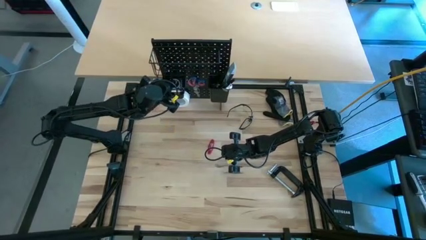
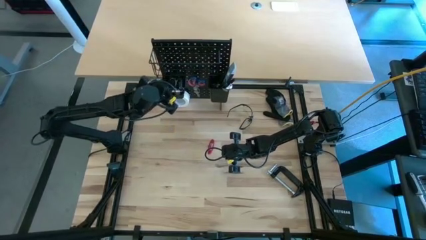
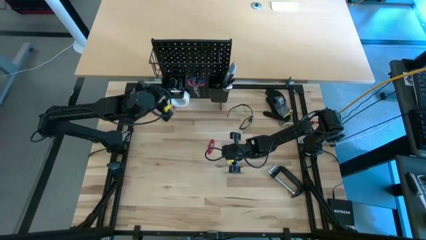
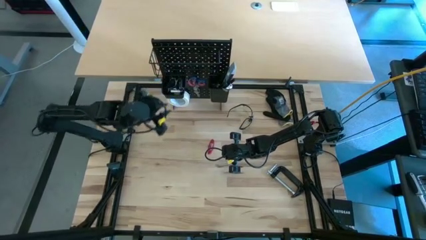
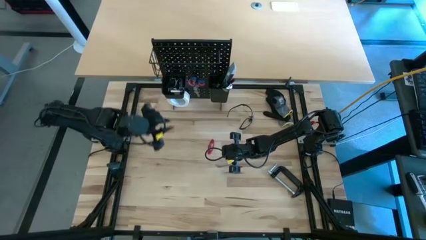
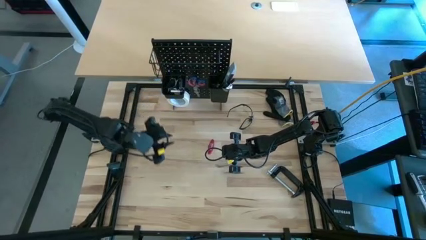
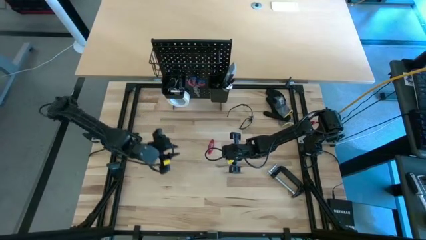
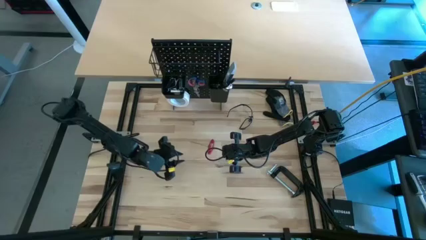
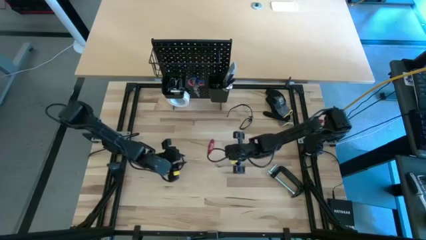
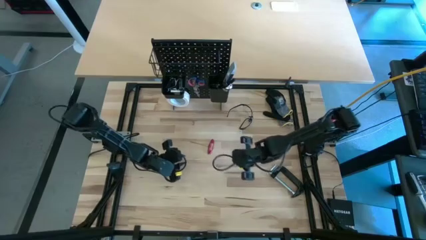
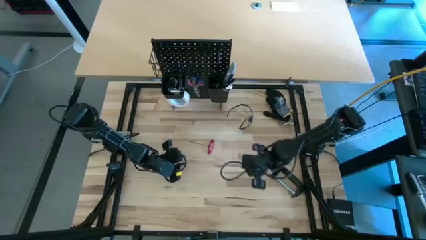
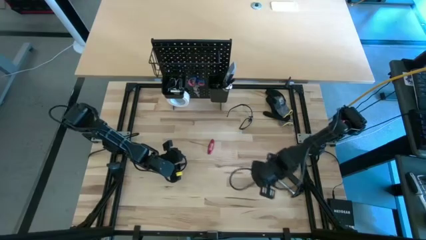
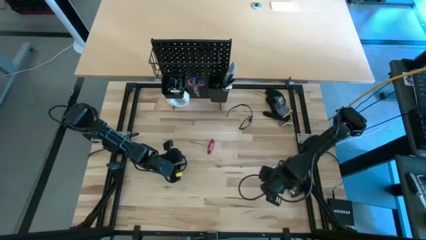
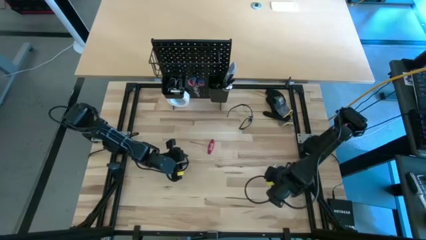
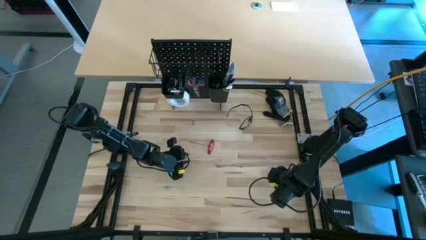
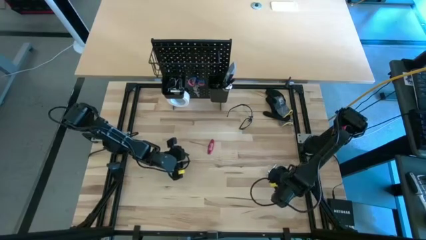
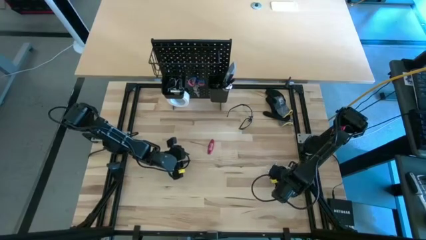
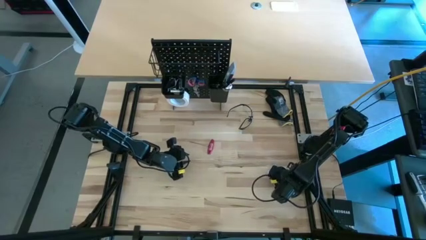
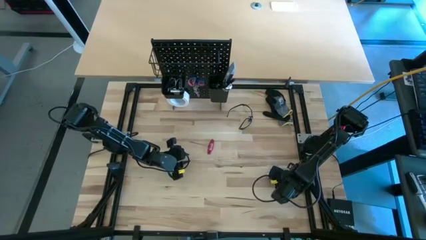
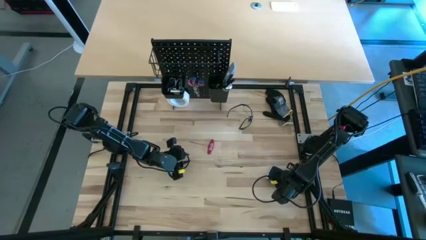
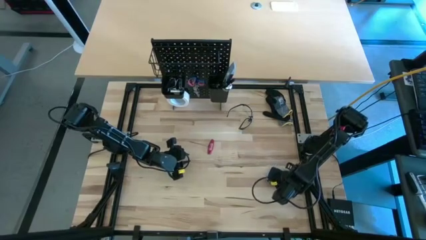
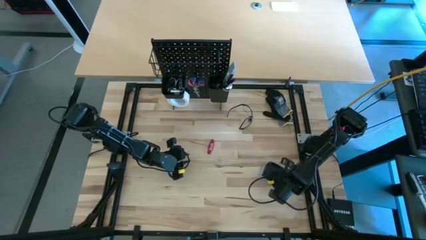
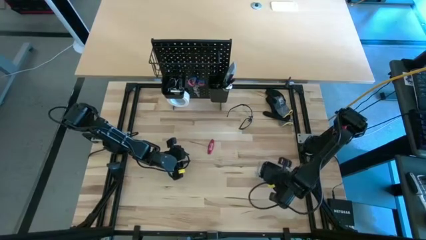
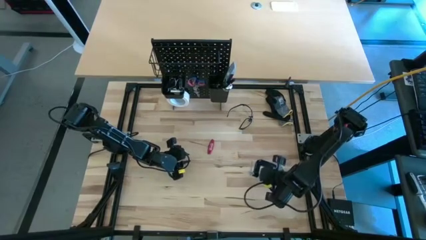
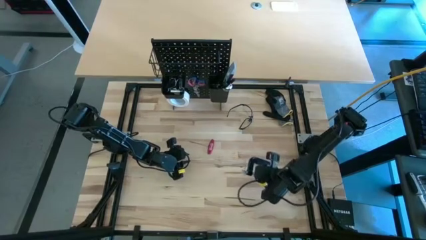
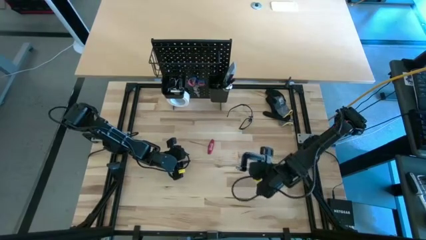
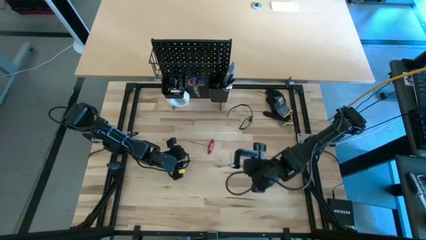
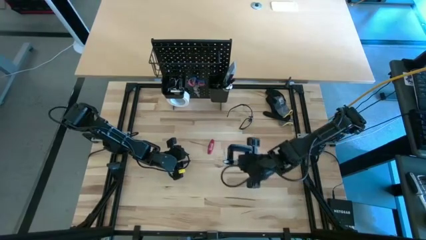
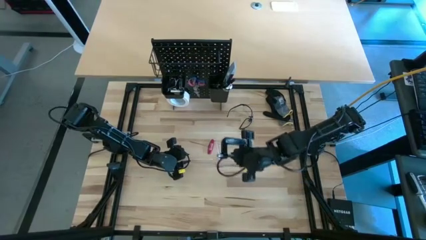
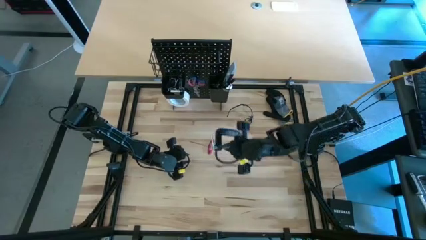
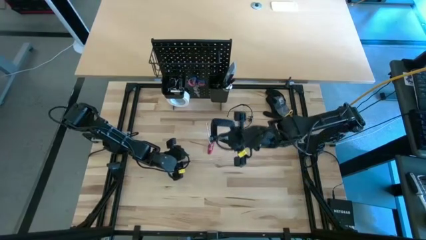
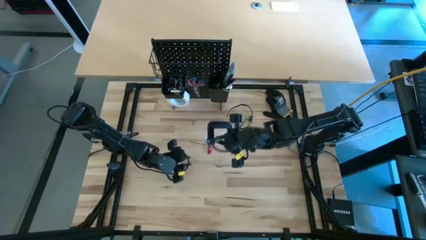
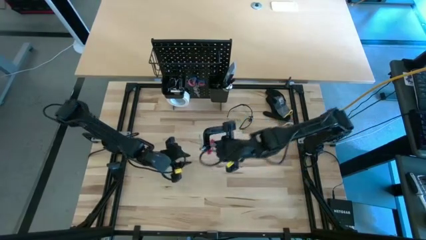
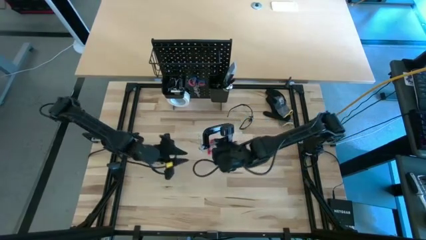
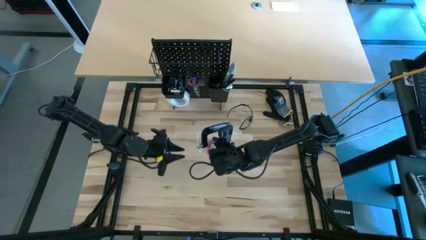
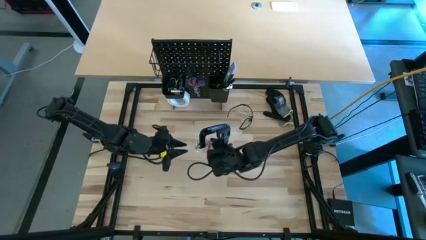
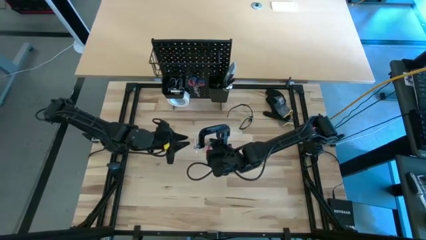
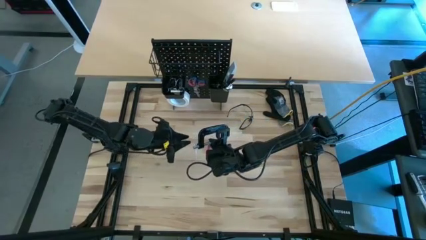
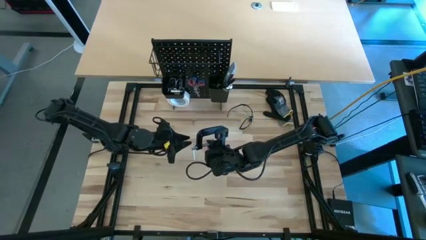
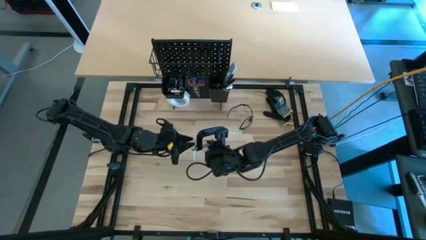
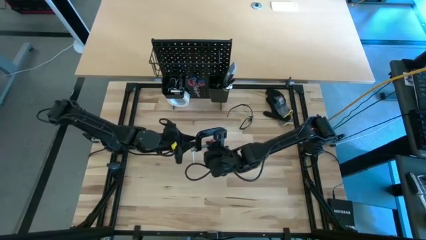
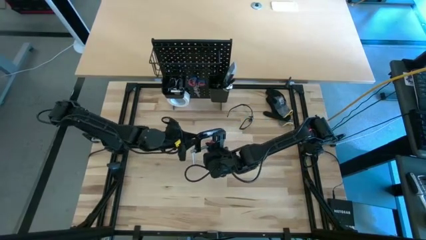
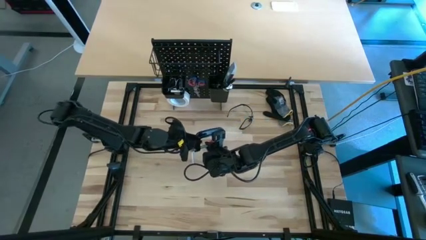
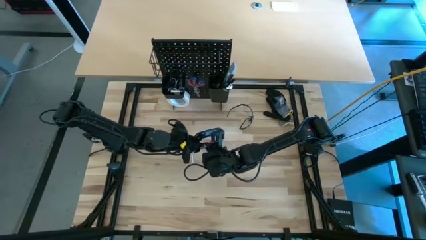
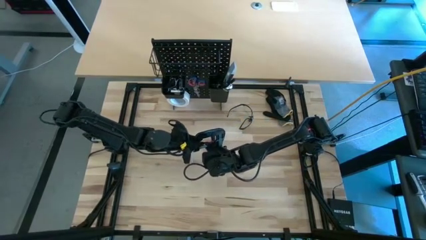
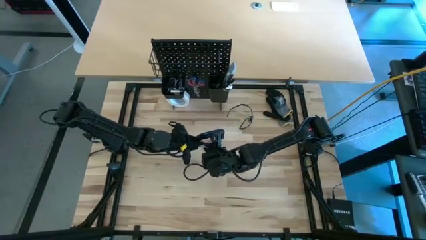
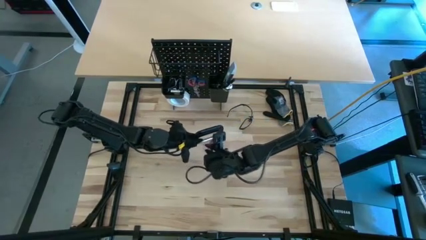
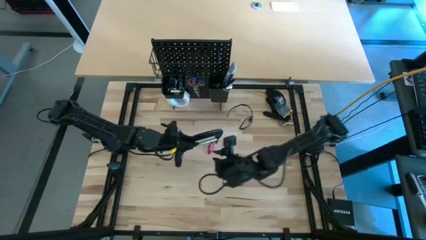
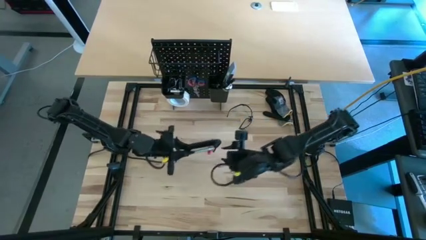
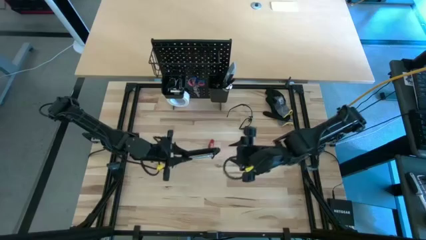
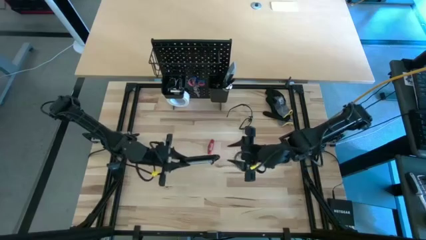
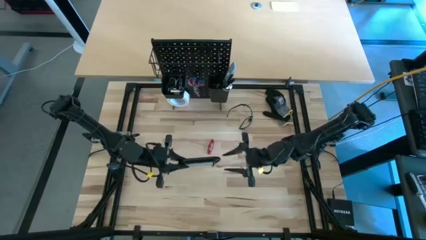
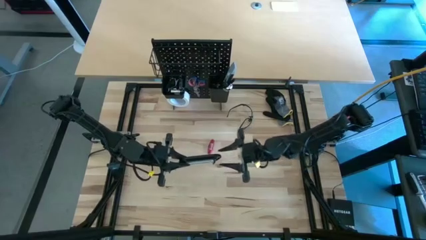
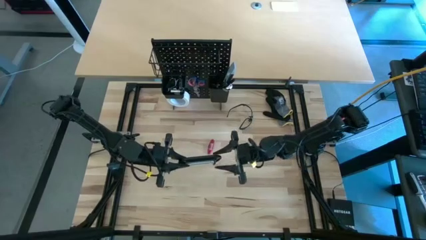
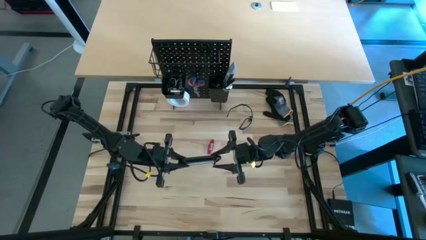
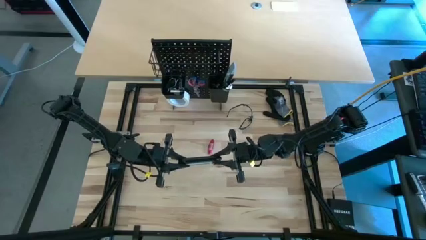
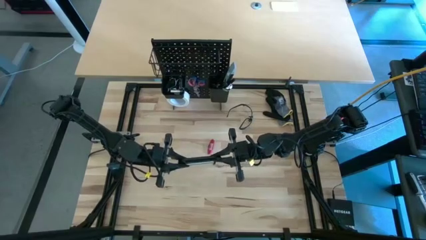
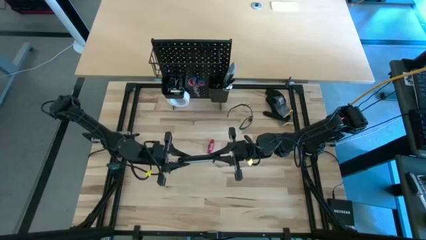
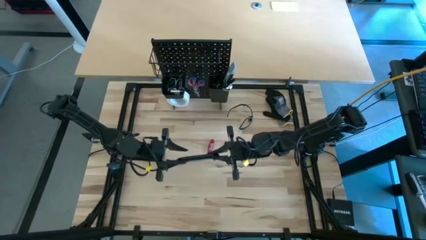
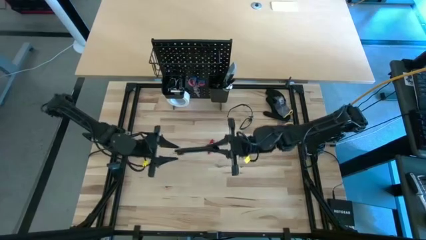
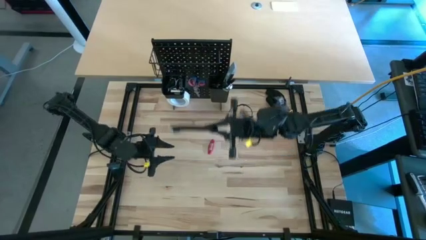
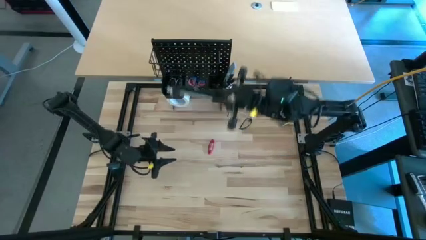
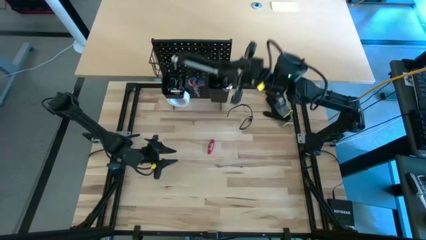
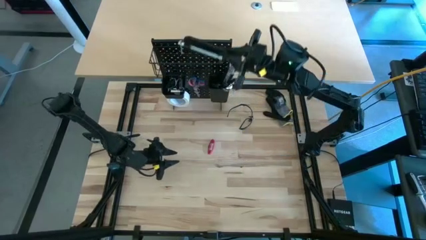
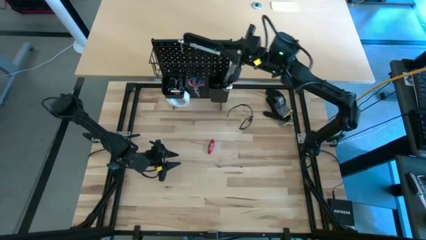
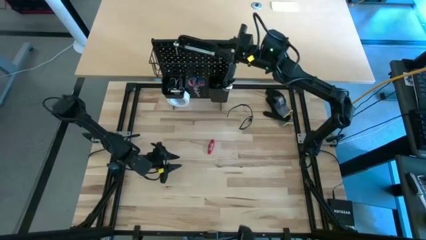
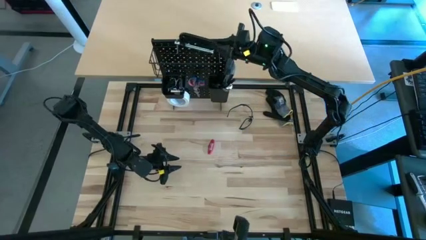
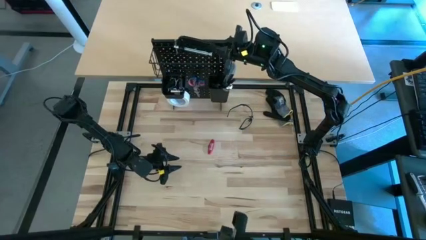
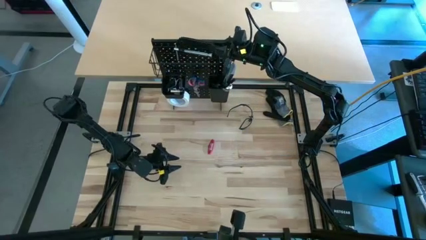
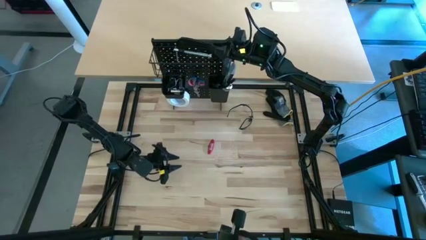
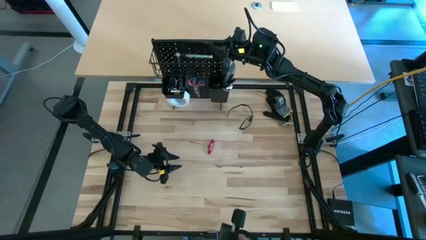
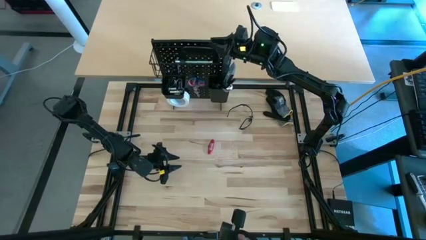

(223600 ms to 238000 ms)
Task: Hang tools onto peg board
Put the black clamp into the black basket on the peg board

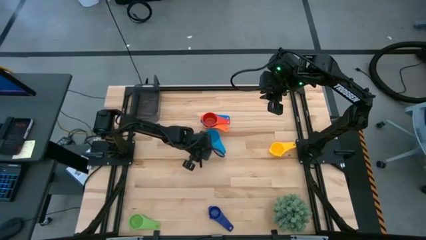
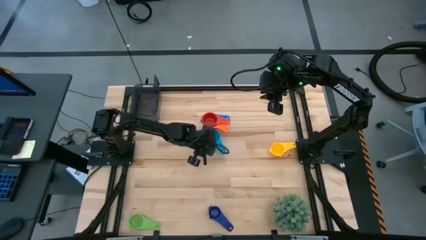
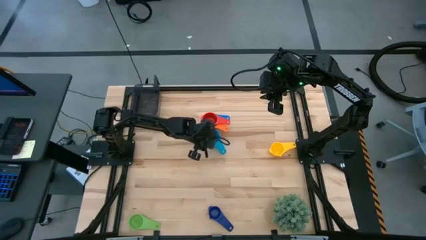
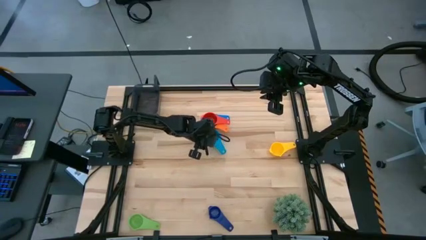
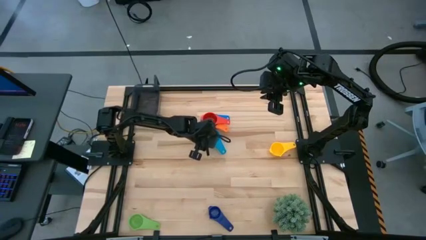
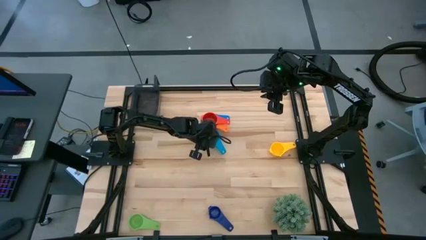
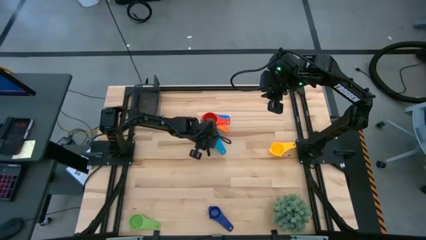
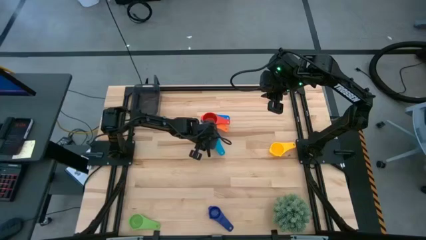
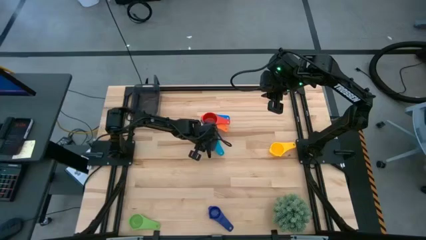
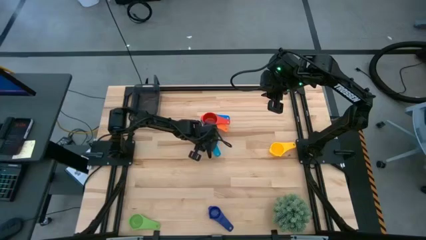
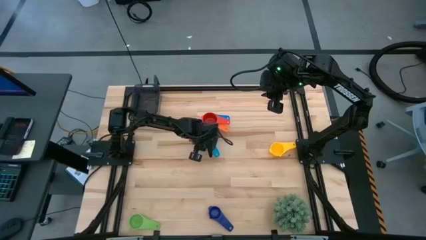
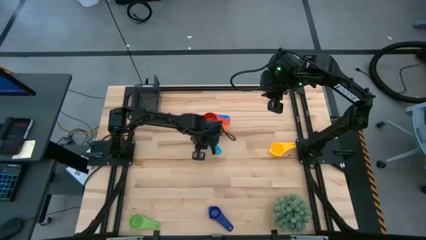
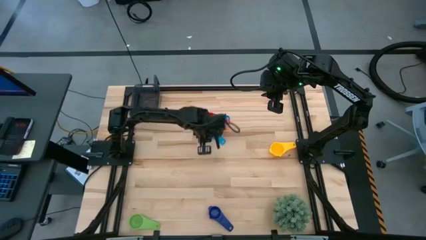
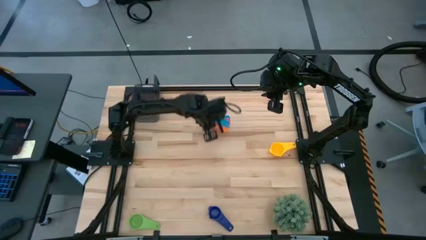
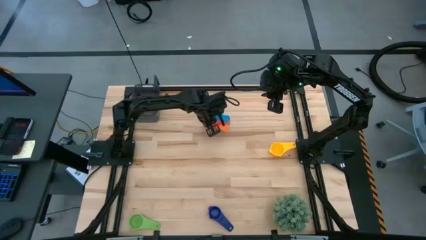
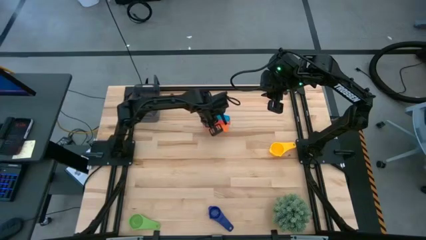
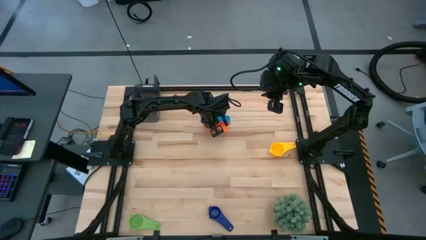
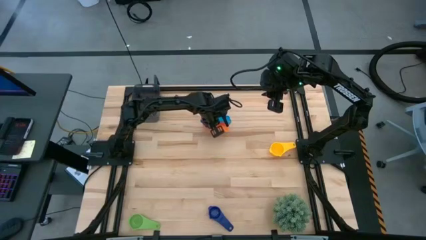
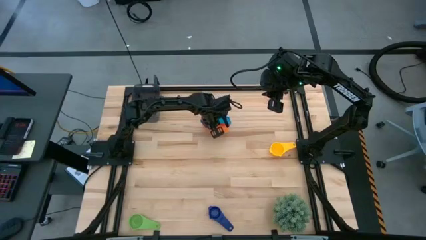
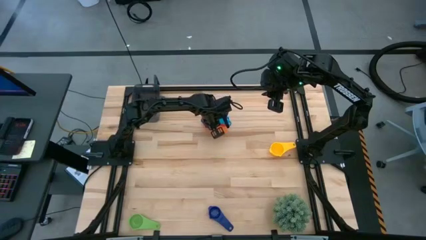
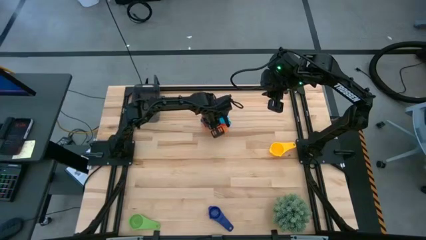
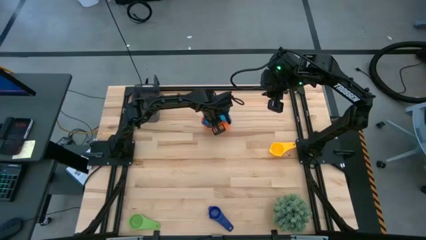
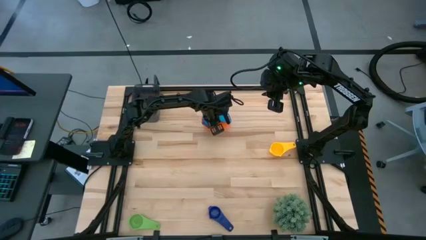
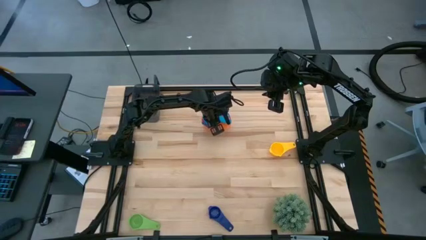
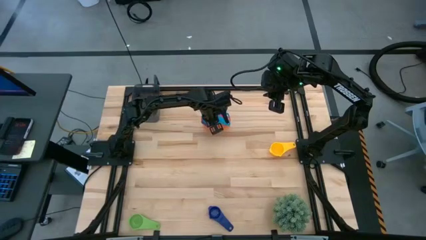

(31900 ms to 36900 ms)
Task: Nest measuring cups in basket
Stack the light blue measuring cup on top of the red measuring cup
